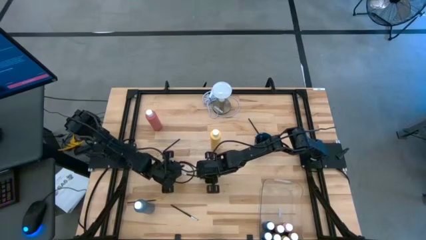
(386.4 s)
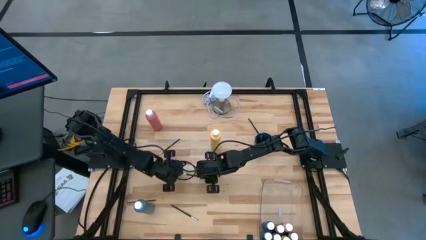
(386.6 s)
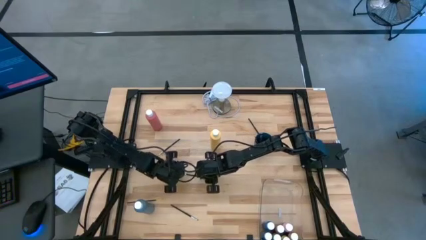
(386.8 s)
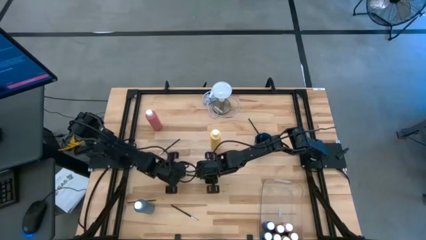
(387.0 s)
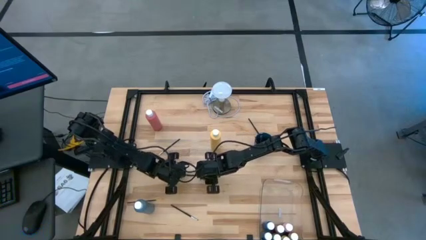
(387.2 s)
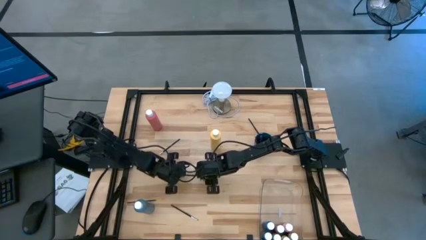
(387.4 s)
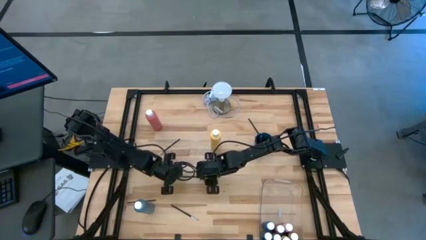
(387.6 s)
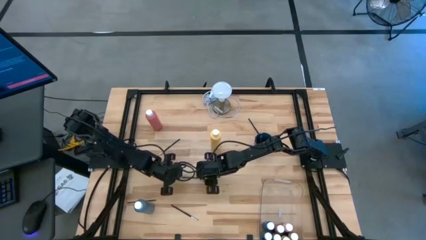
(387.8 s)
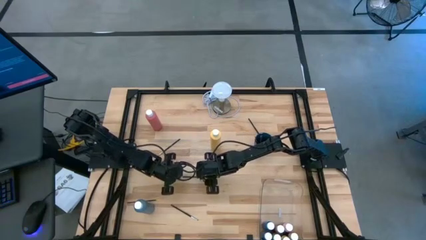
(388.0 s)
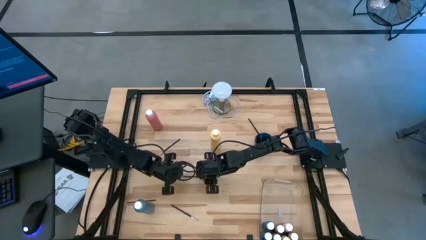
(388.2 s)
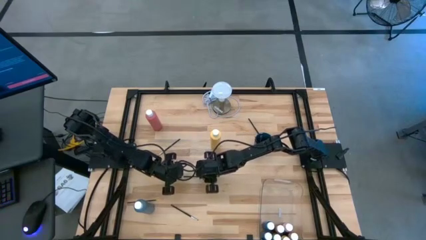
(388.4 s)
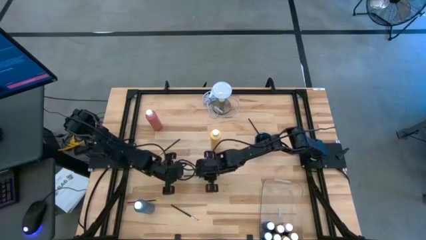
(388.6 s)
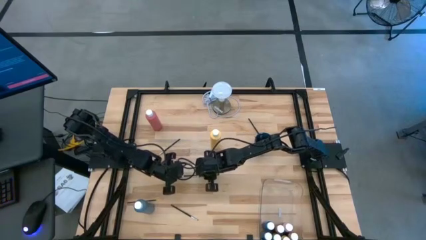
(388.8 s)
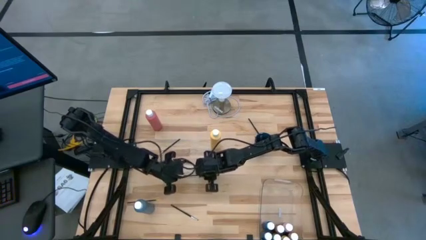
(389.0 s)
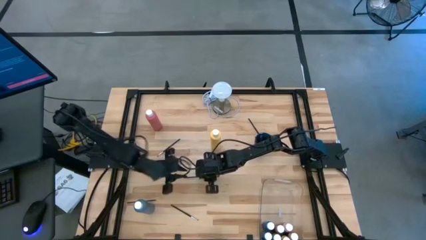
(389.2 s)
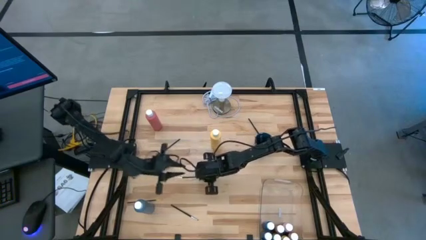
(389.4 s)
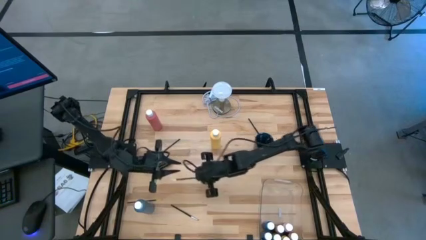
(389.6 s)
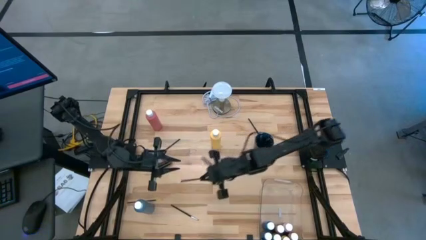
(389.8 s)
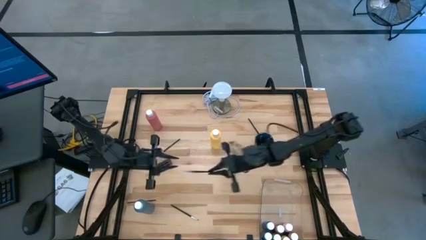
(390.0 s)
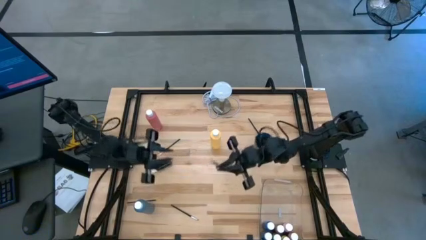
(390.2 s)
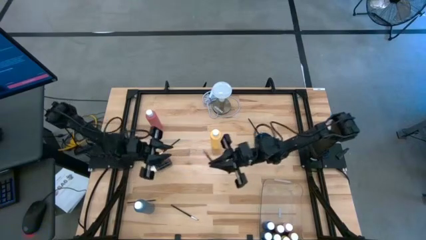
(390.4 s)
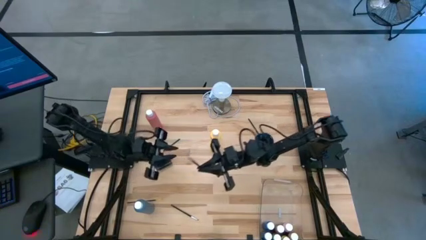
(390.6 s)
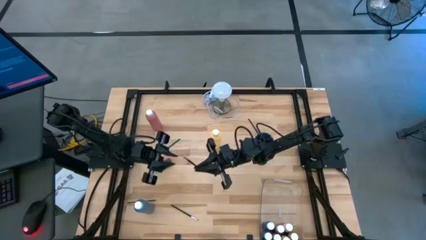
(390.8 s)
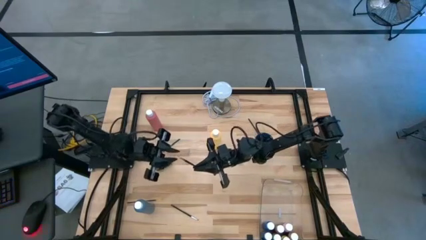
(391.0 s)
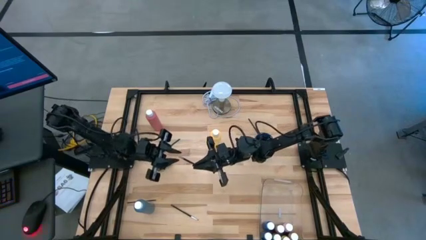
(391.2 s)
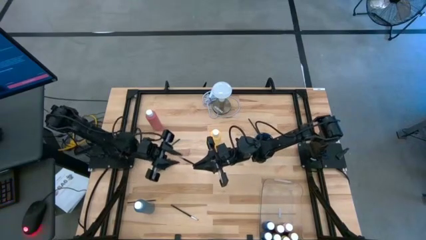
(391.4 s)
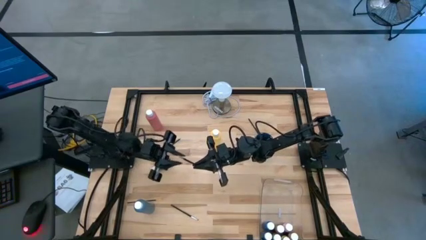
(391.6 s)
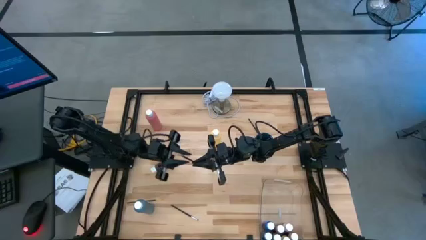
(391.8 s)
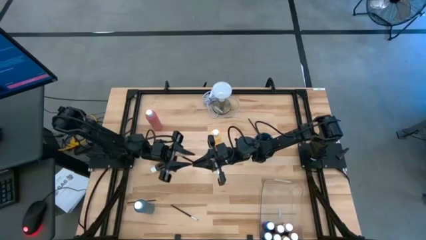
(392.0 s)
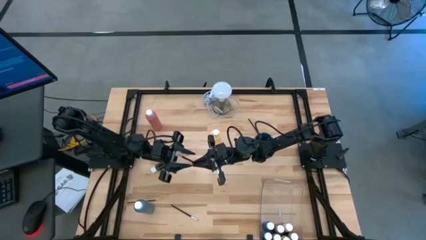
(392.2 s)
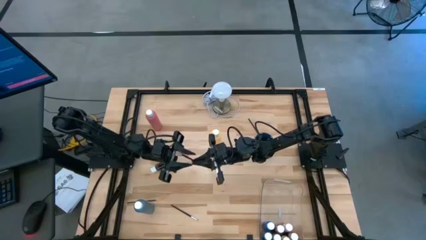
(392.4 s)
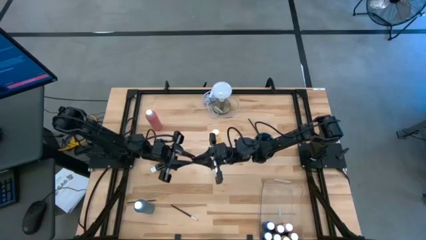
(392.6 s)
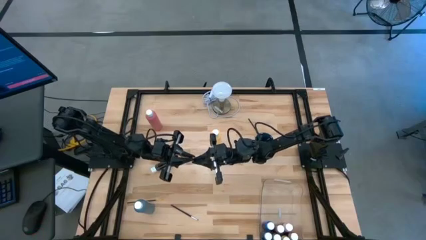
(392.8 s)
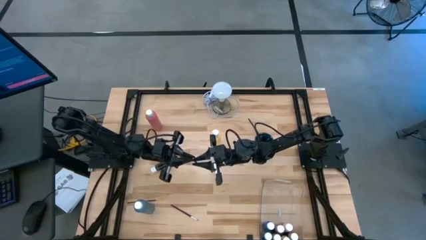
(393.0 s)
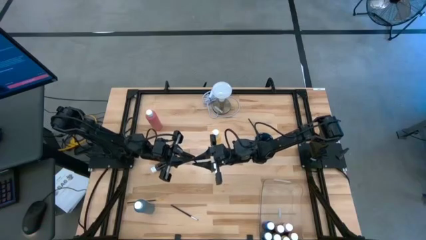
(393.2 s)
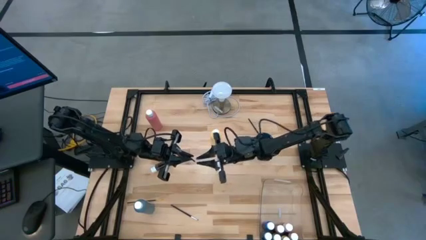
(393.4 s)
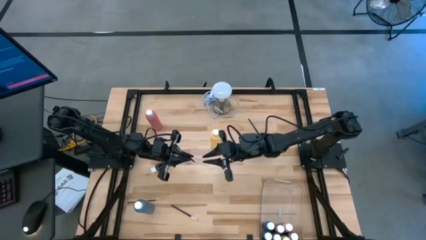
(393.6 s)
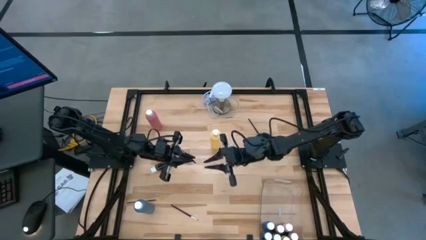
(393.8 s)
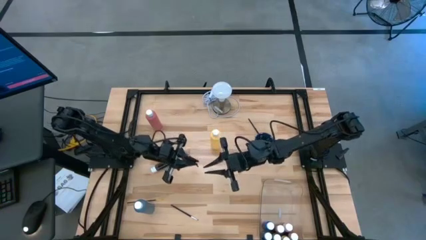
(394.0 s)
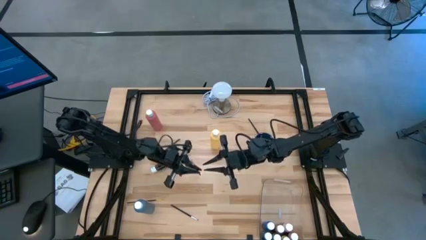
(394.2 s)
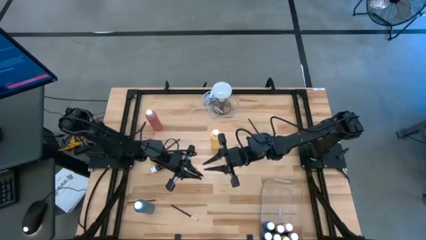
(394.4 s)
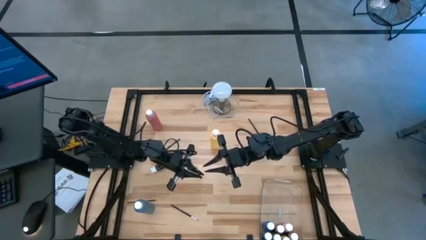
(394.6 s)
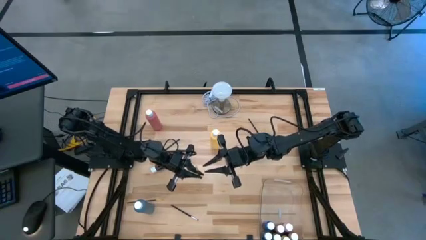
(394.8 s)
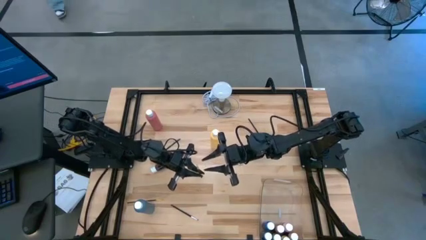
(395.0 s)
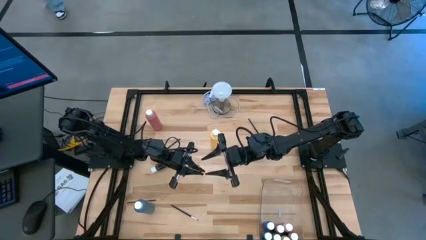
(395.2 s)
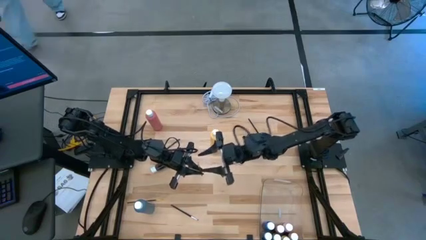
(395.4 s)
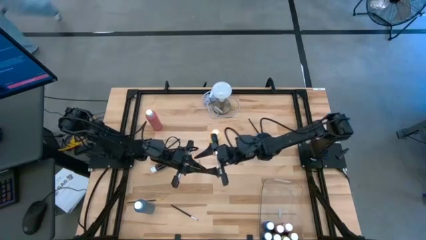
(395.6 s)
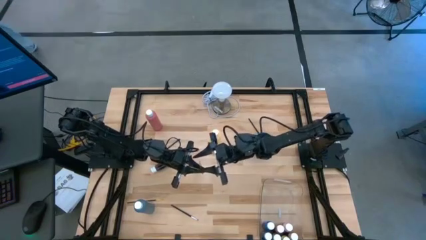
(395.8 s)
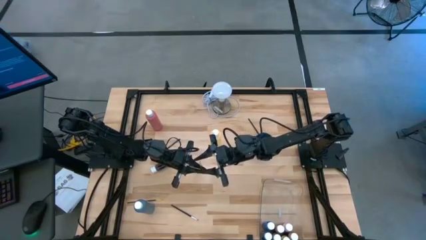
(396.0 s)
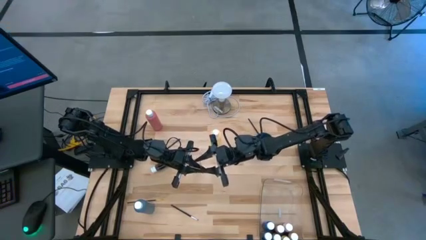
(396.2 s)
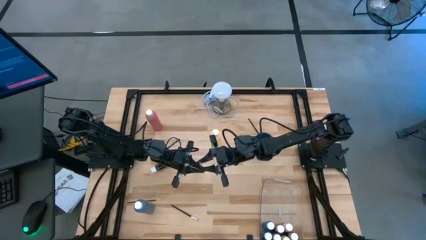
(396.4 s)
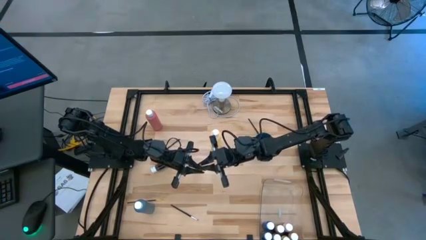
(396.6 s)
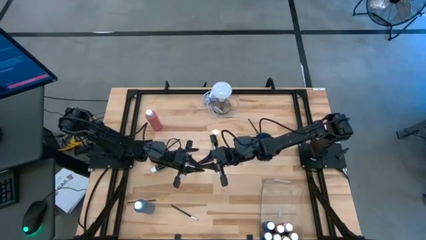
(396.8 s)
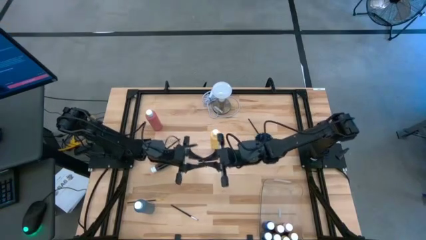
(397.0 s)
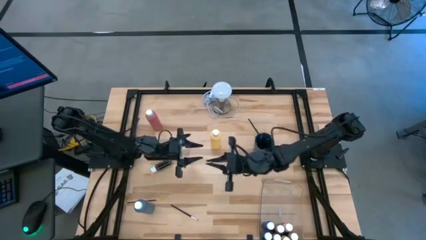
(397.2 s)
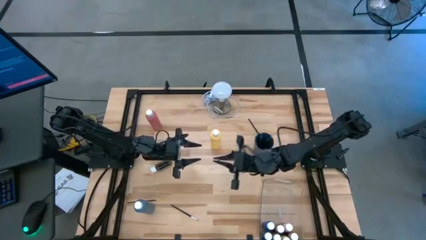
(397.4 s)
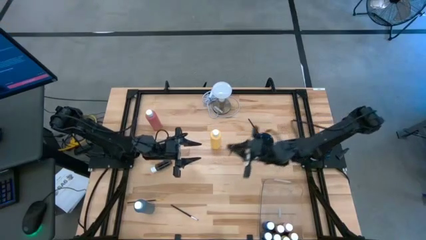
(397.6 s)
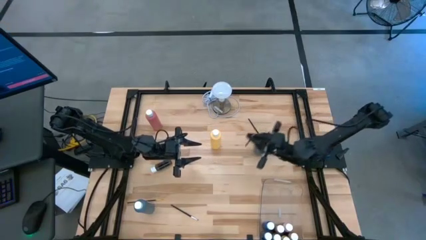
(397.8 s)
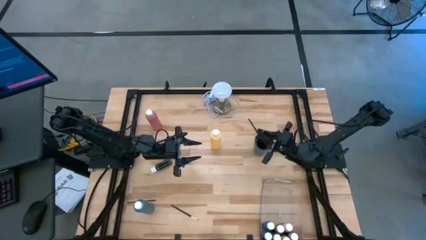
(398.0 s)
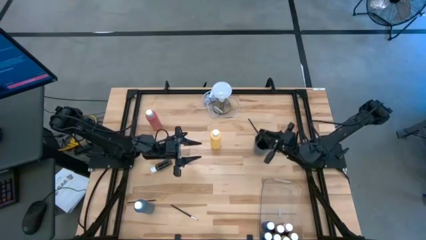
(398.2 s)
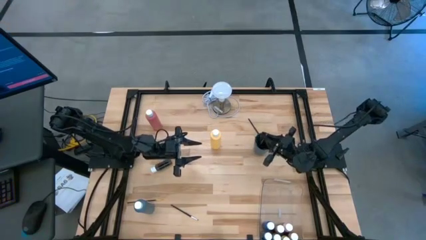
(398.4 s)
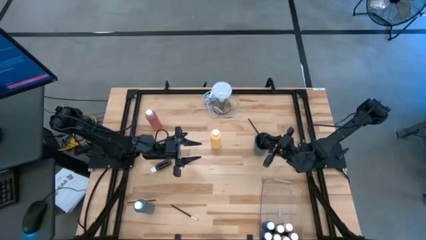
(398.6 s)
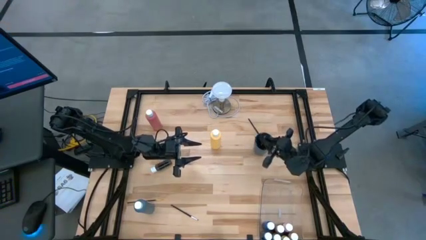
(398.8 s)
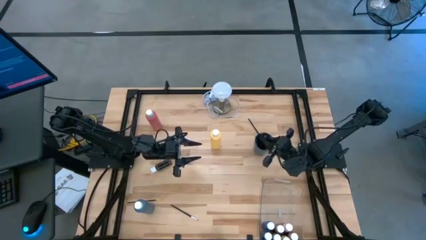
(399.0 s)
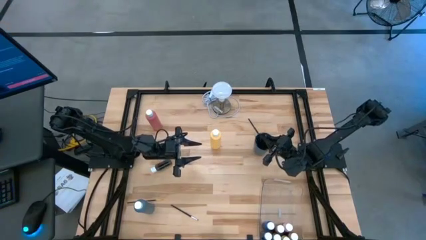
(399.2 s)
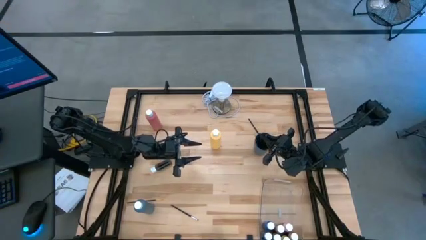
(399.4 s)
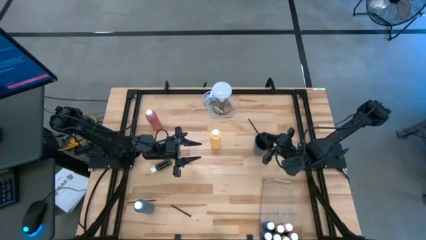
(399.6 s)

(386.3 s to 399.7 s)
Task: Pick & Place Paint Supplies
Put the black silver paintbrush into the blue cup
